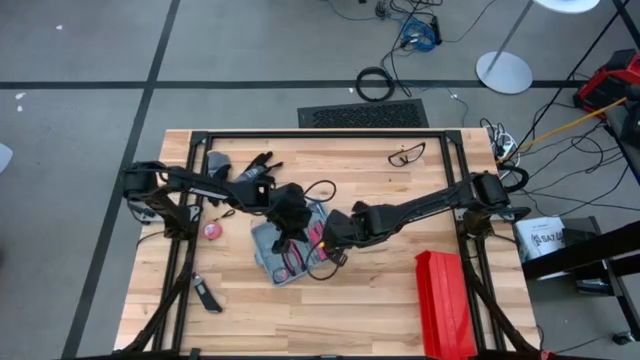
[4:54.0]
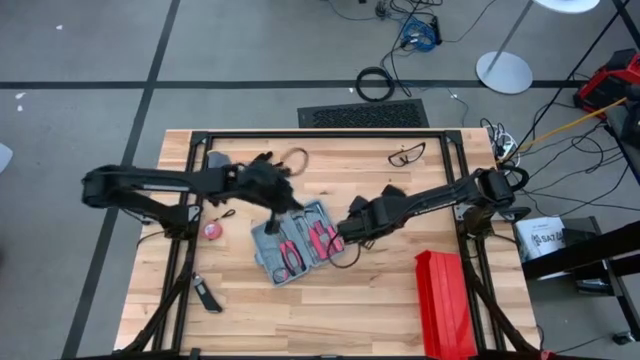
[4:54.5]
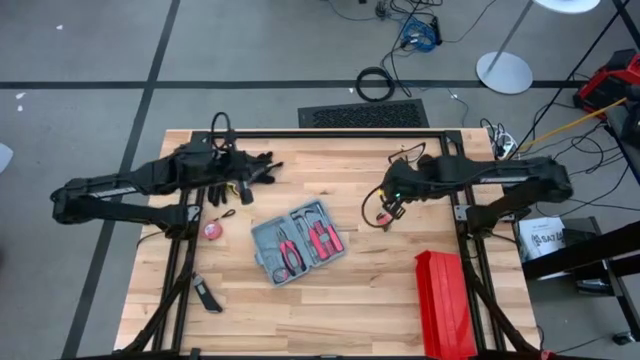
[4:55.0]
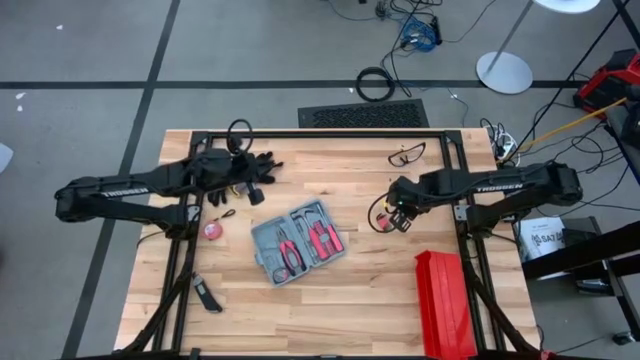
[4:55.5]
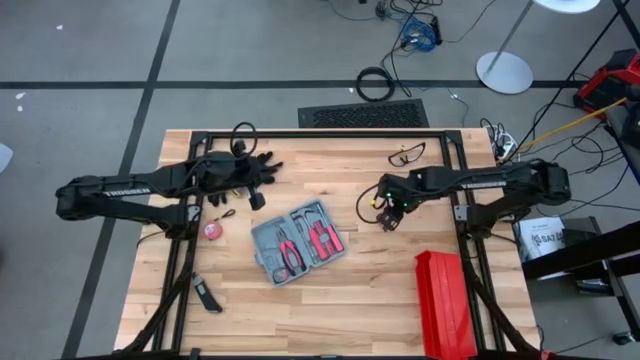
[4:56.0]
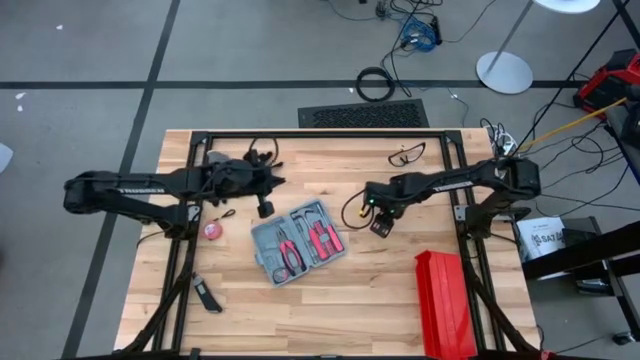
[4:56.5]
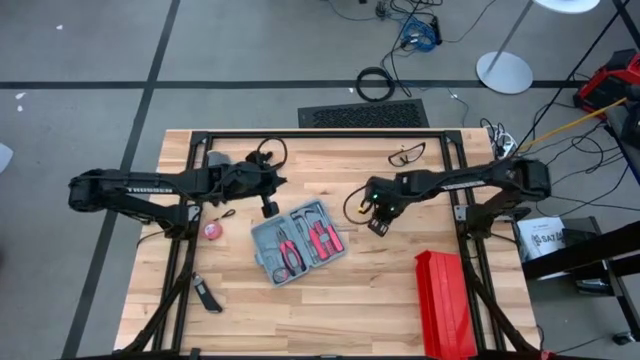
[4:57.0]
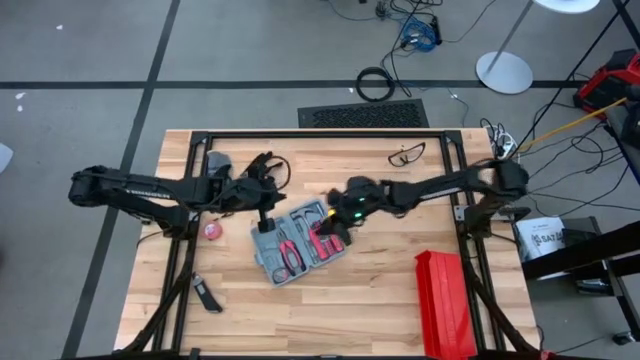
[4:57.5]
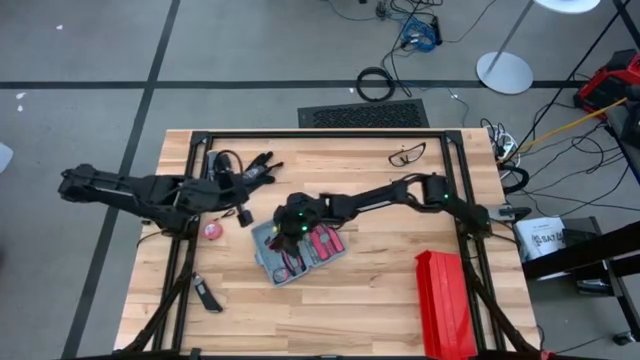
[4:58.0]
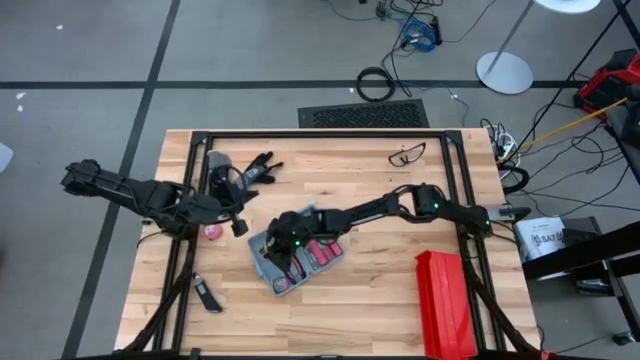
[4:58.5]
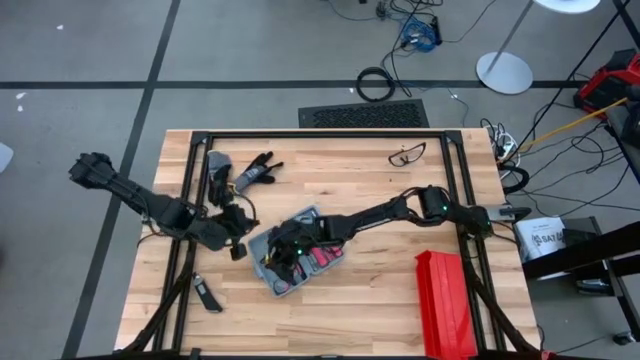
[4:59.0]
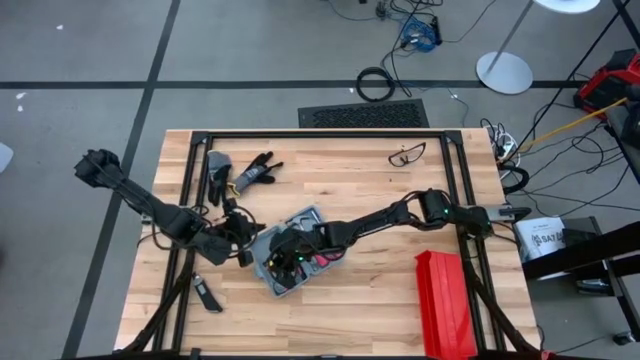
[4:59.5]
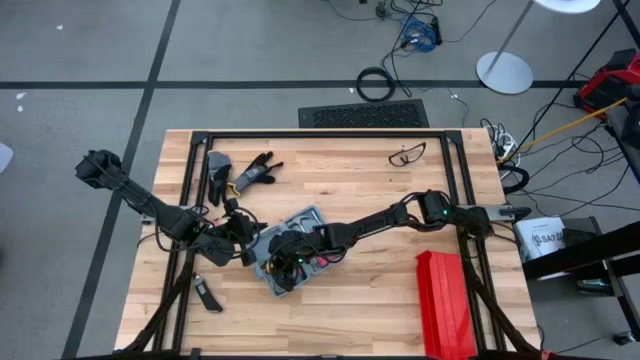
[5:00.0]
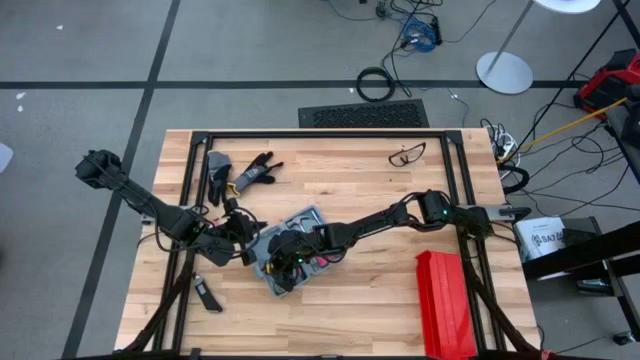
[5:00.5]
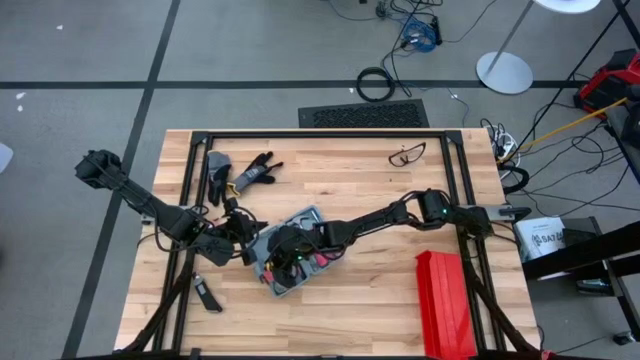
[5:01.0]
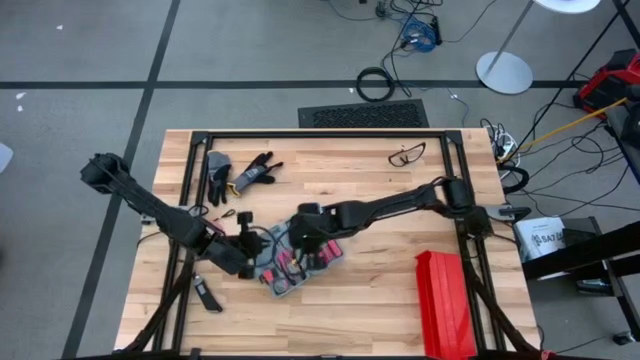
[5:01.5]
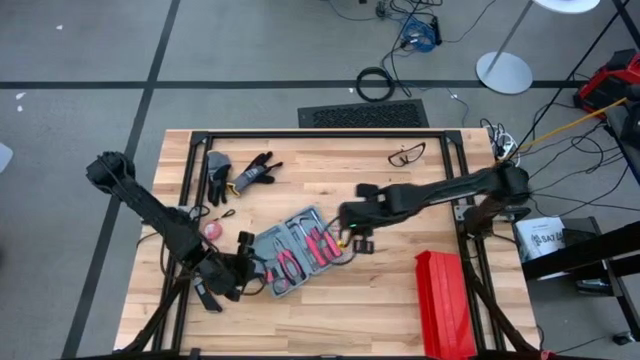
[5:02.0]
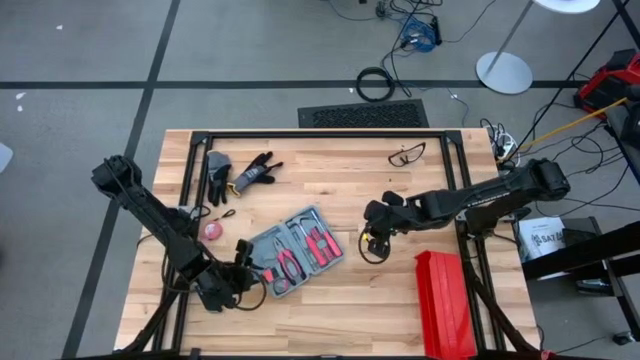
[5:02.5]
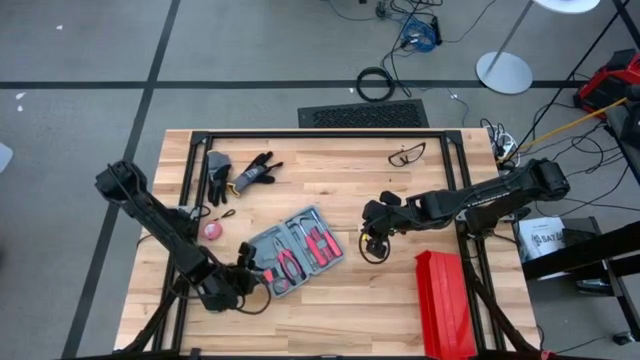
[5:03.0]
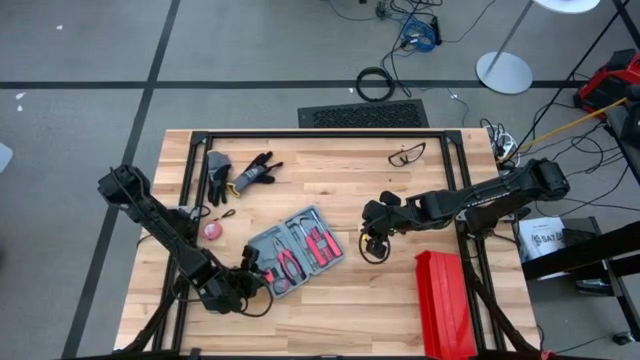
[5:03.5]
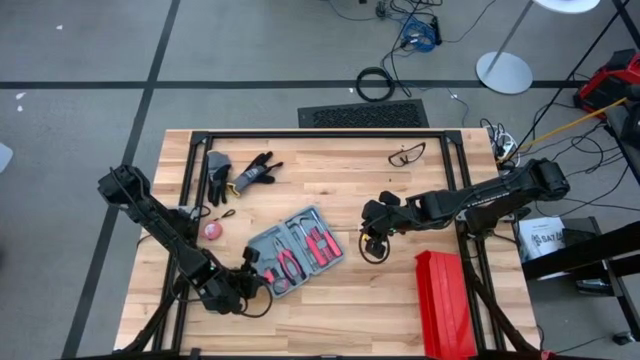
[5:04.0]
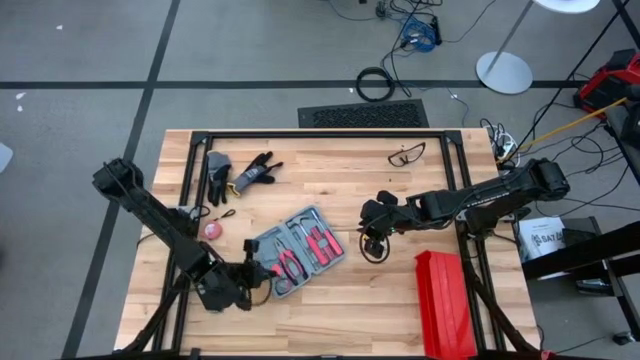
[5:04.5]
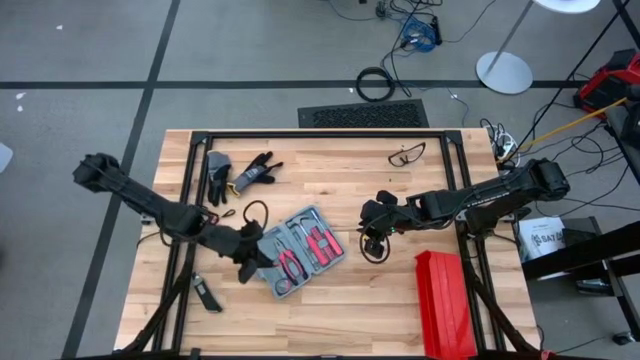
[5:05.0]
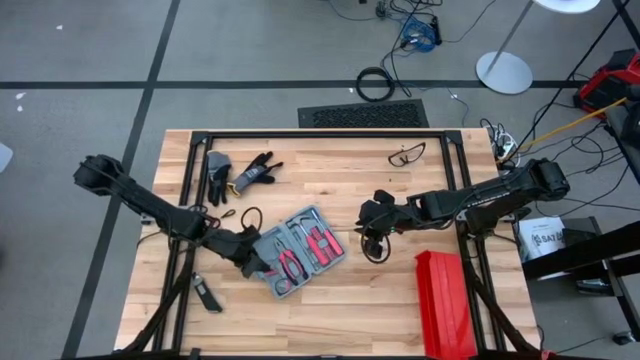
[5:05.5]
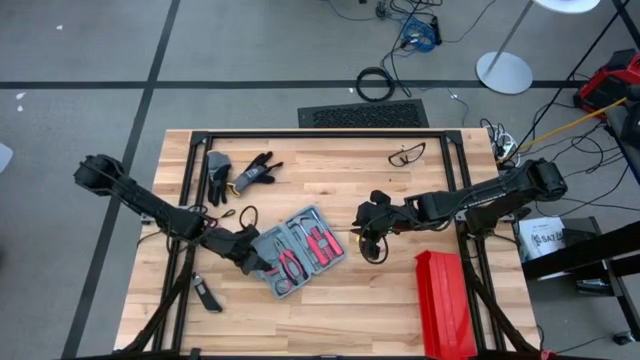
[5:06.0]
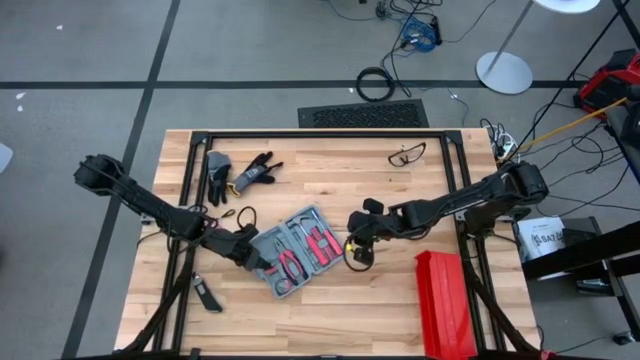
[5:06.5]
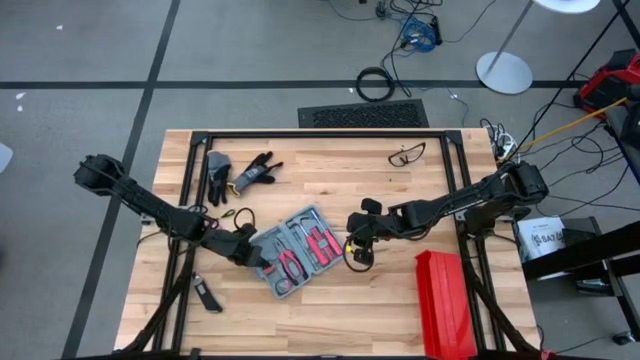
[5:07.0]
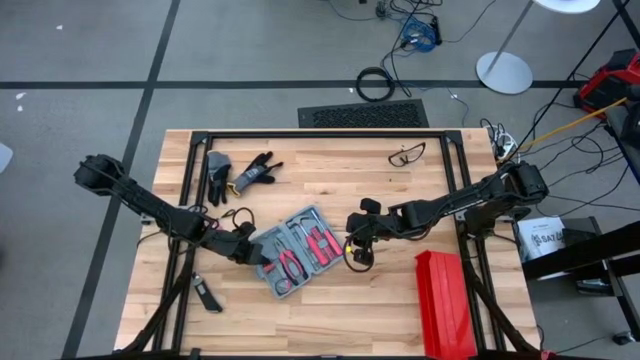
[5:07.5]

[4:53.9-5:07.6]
Task: prefit tool cases
Put the red allen wrench into the gray prefit tools case

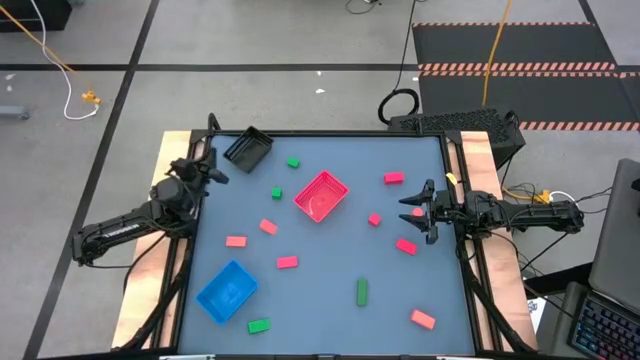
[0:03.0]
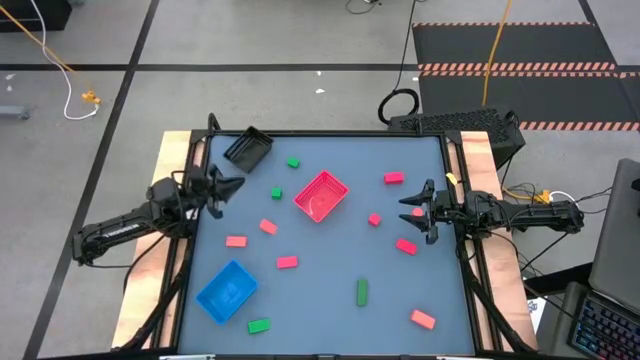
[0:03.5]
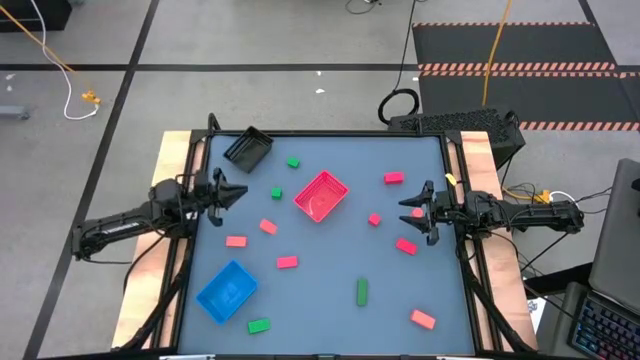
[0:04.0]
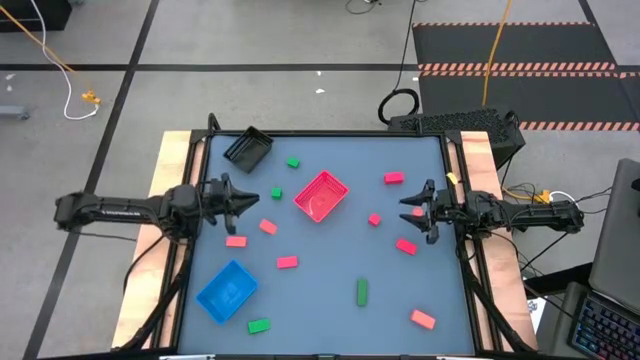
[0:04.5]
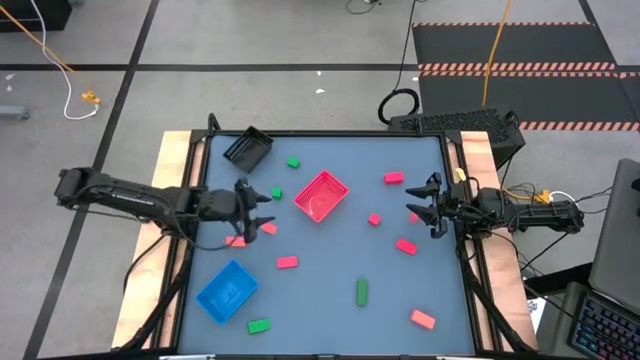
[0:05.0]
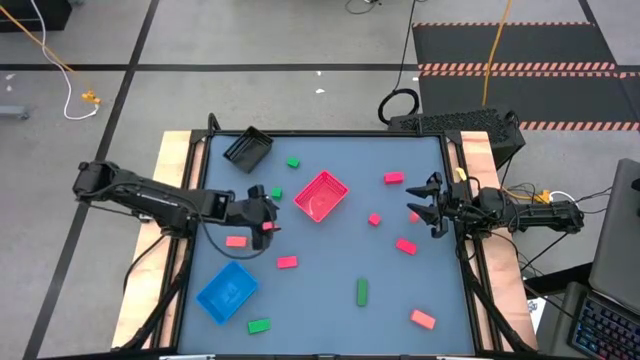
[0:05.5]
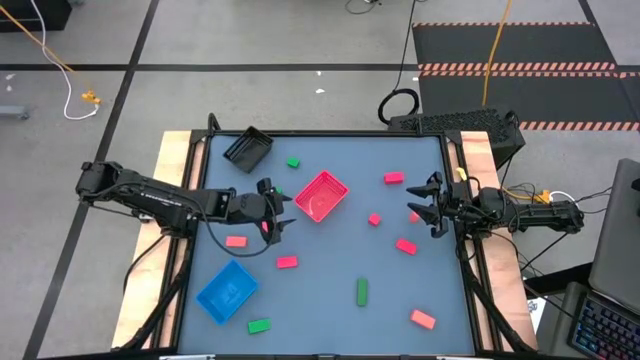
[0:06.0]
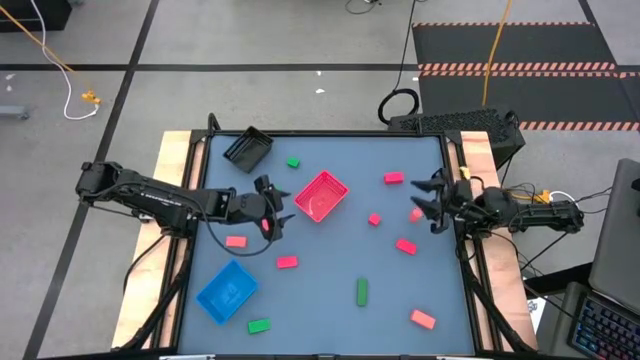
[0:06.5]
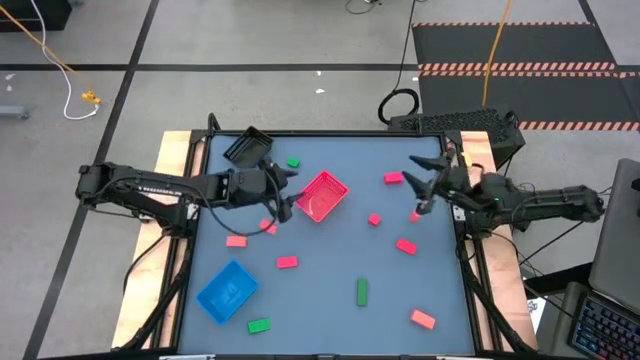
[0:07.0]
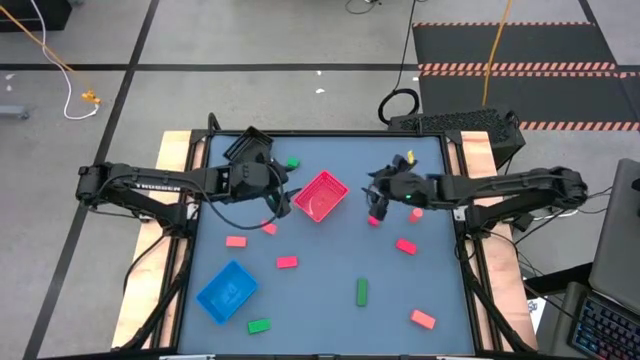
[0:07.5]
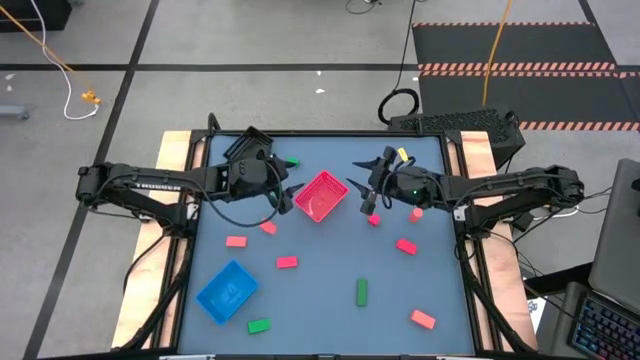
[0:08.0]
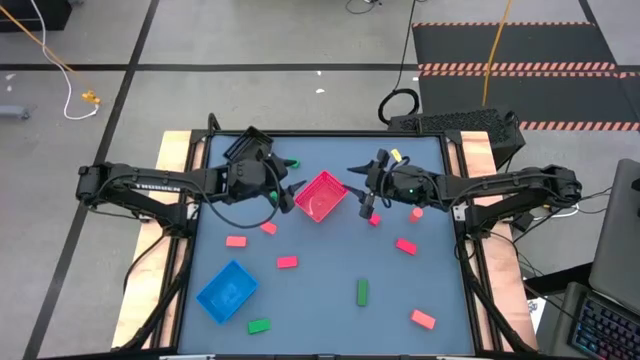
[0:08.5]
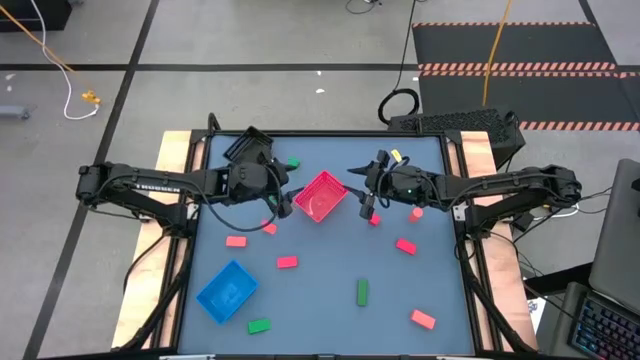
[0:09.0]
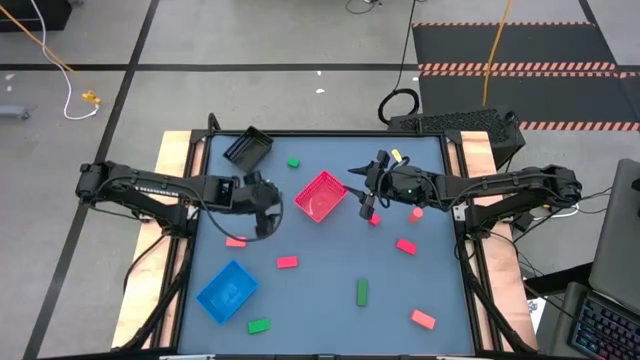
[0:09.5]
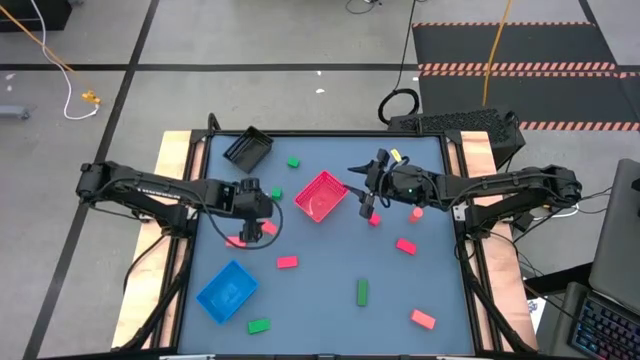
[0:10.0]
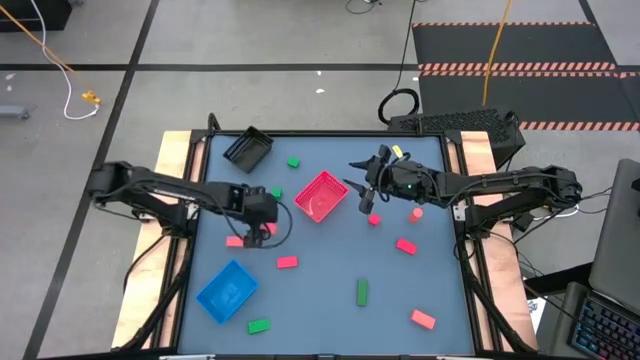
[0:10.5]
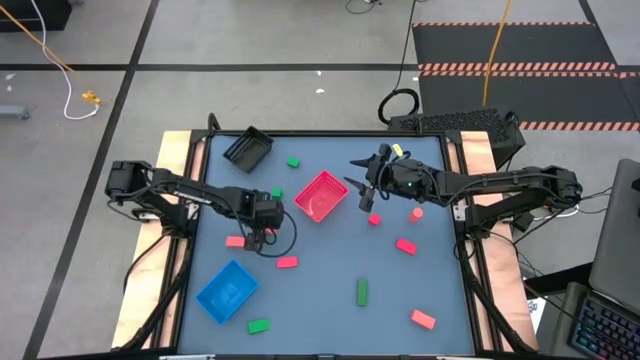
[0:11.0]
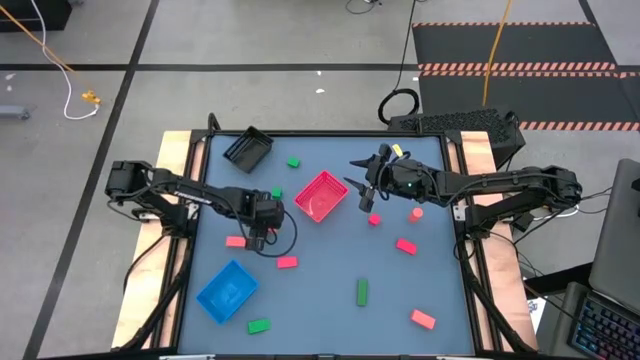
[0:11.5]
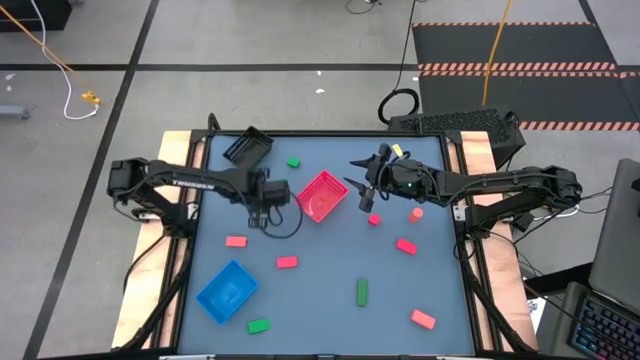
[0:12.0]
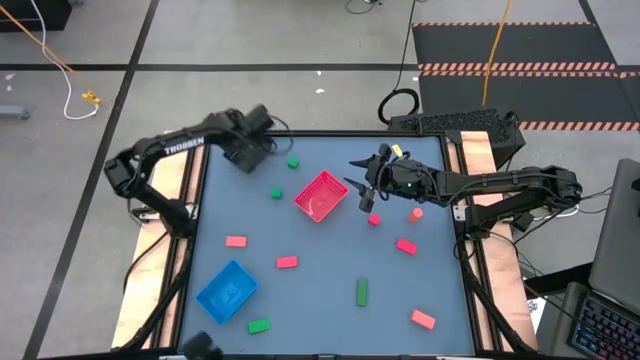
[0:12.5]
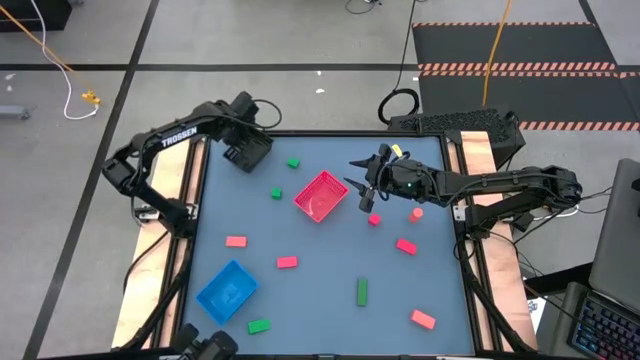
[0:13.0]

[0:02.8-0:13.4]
Task: Sort & place blocks by color
Put the orange block into the black bin
